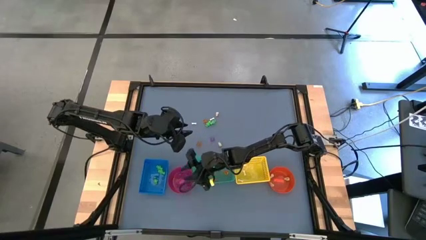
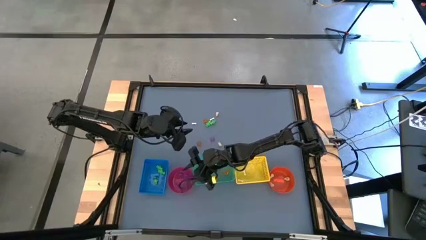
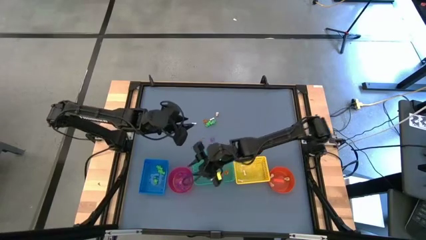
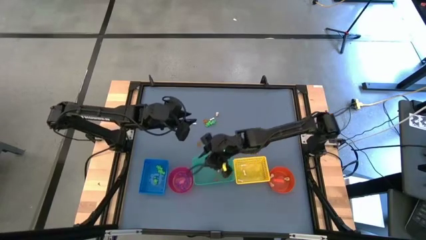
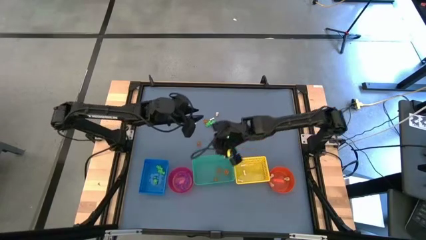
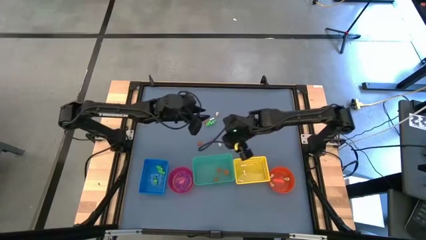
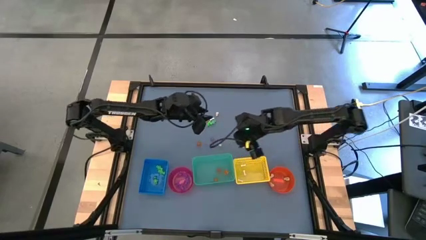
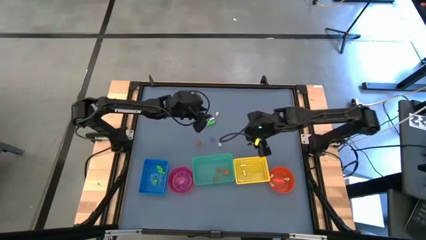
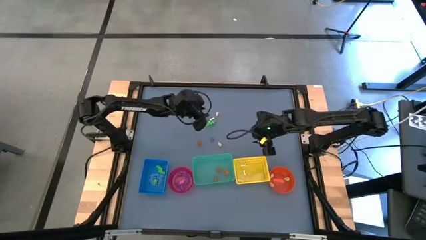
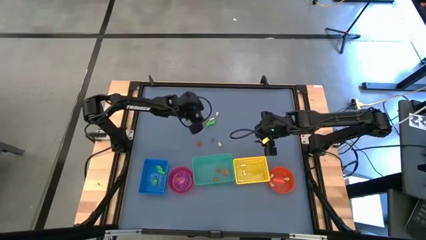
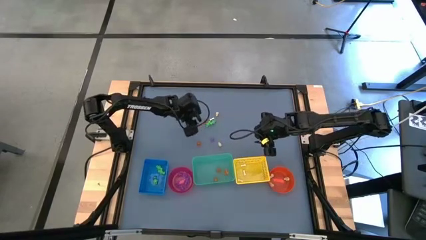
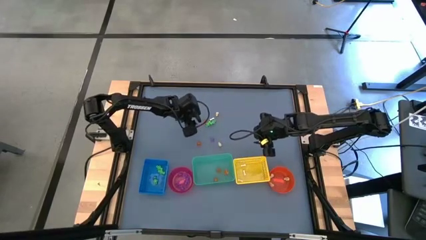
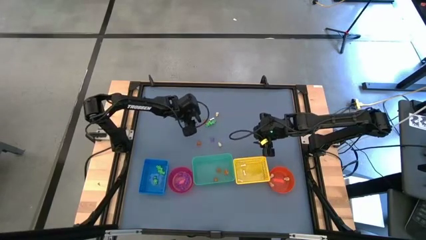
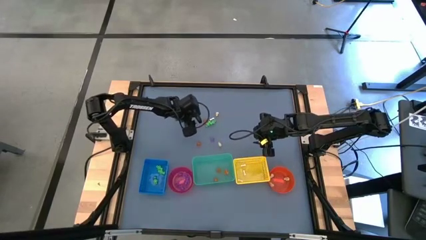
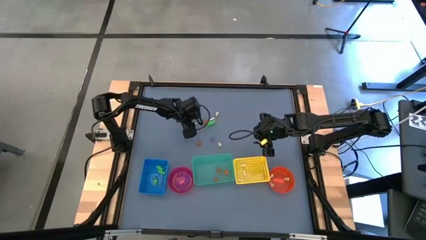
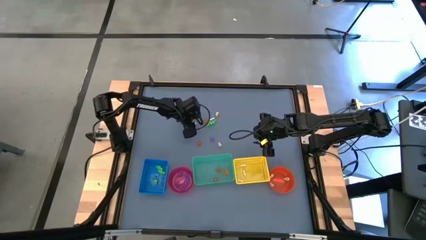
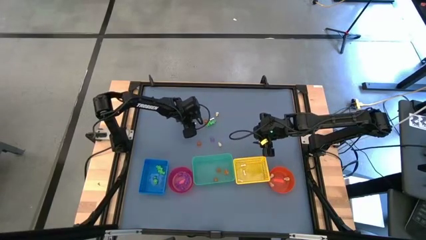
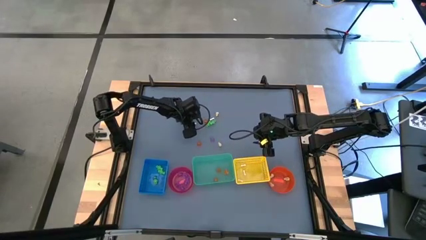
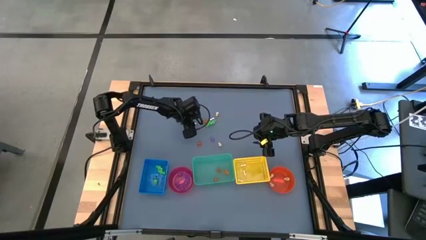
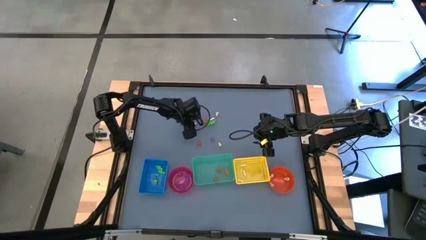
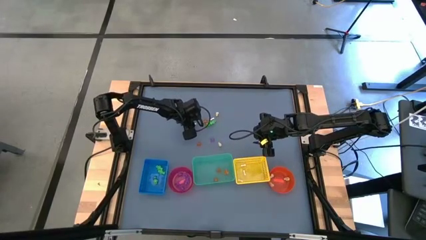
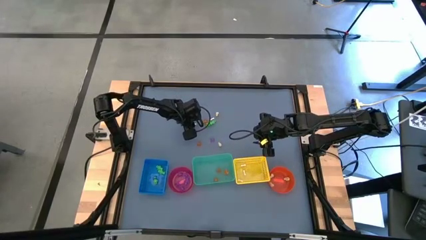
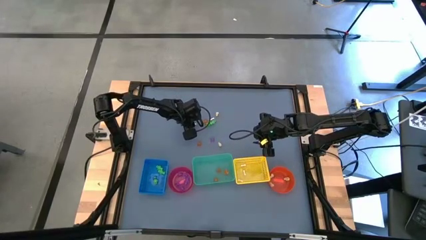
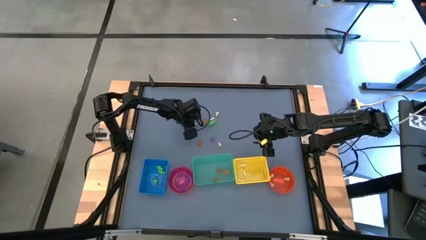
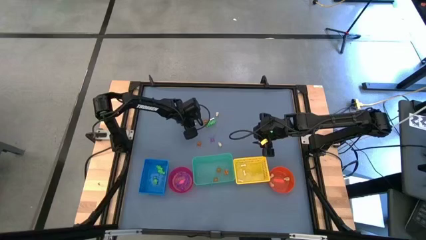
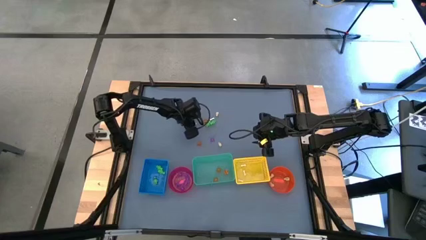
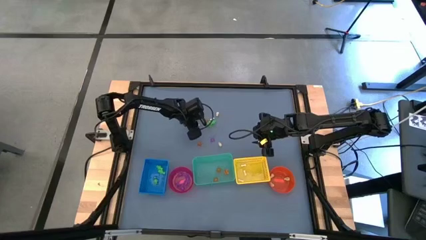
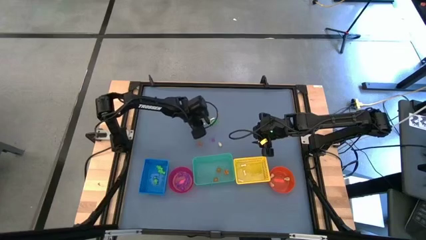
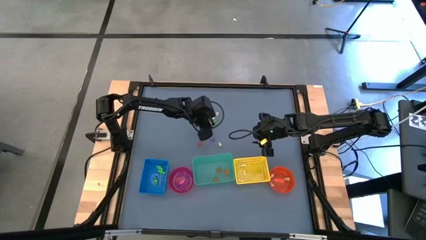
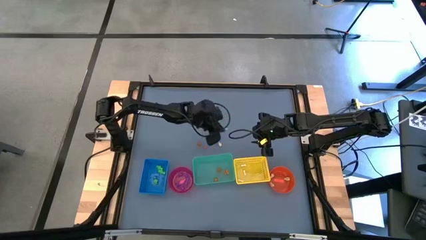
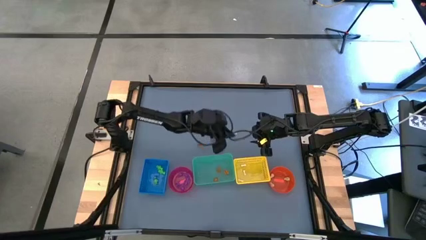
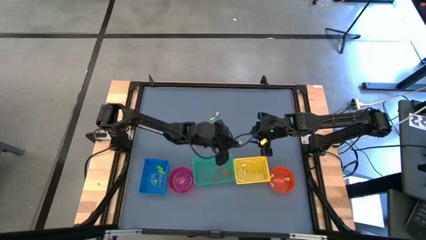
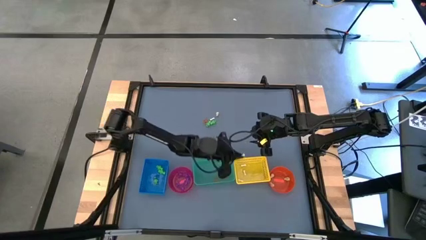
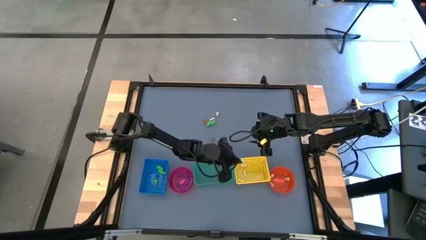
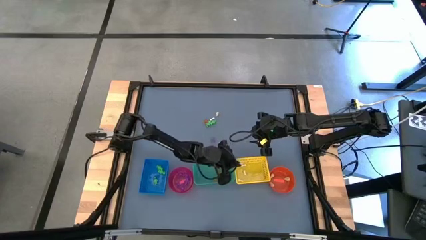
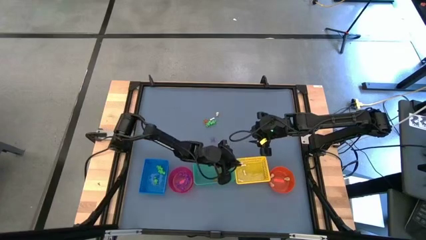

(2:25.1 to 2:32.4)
Task: Sort Halloween decoration
Put the white bone toy into the yellow bin

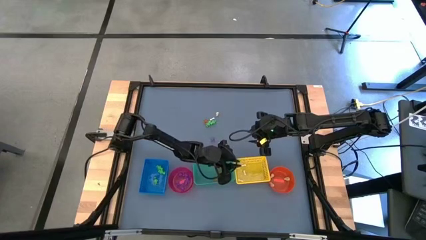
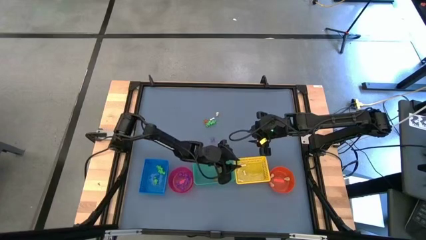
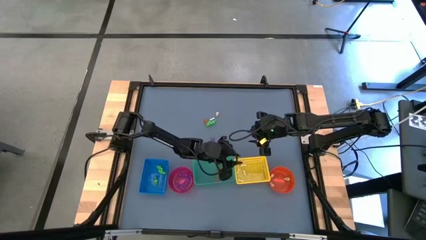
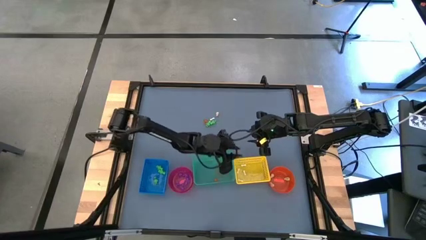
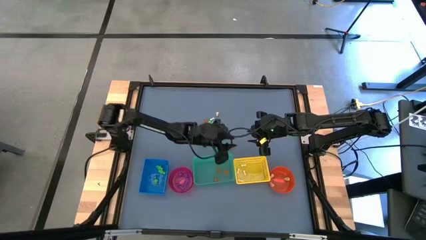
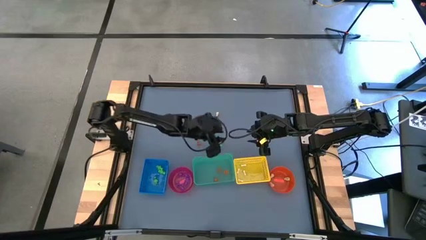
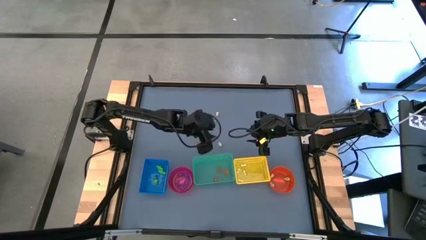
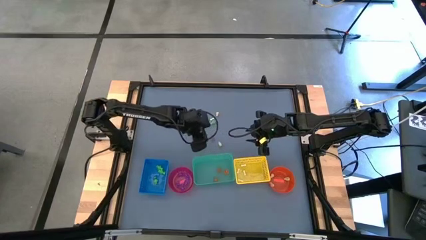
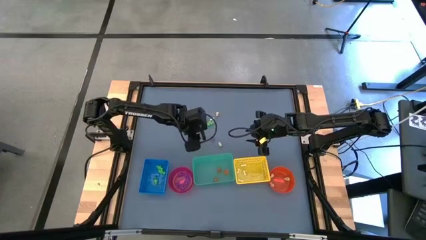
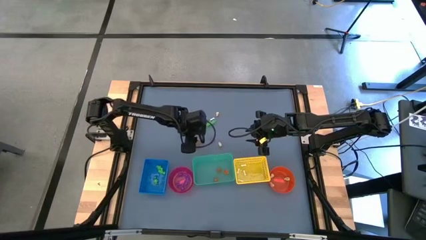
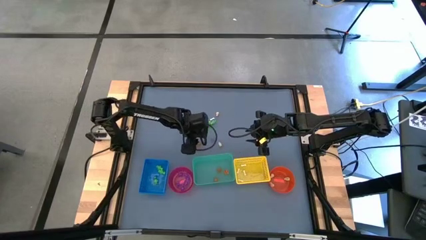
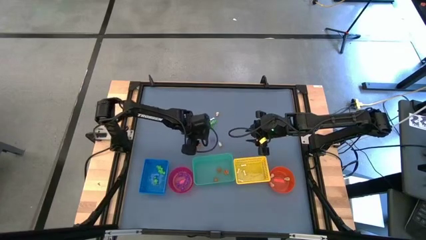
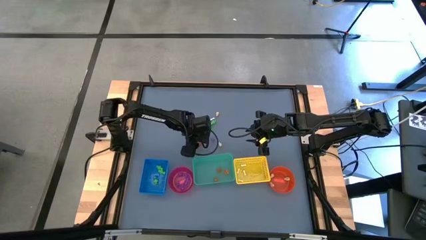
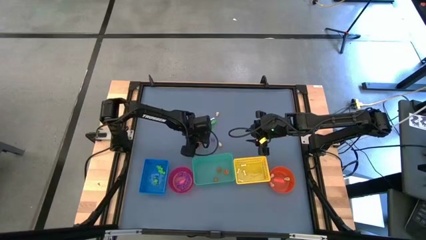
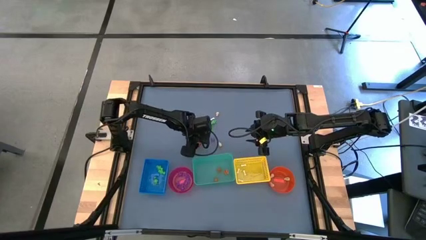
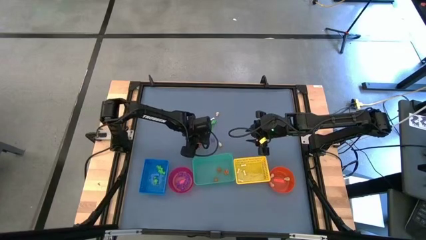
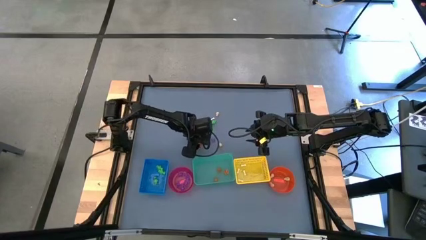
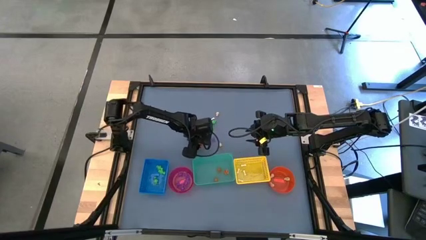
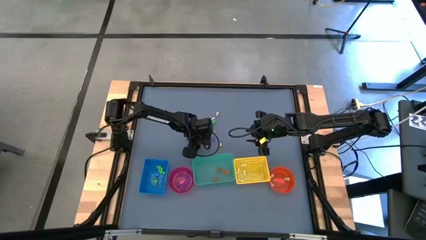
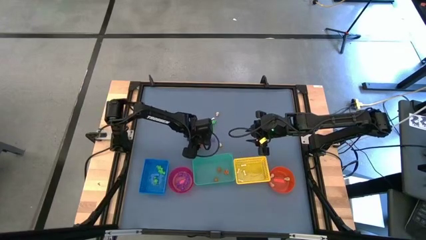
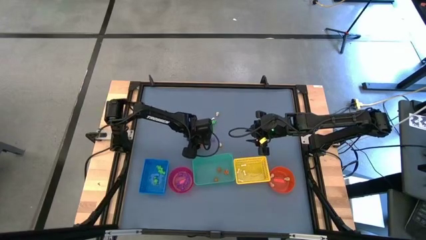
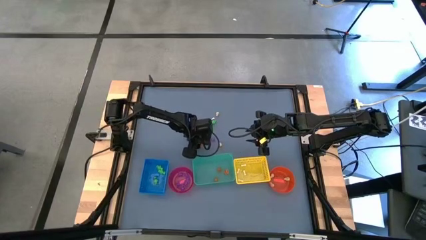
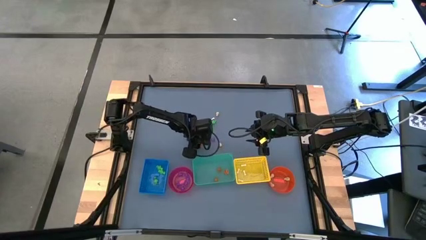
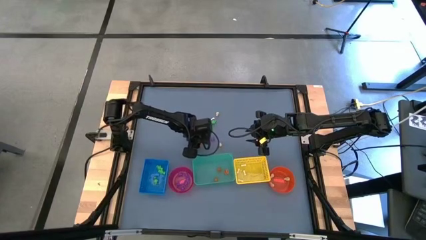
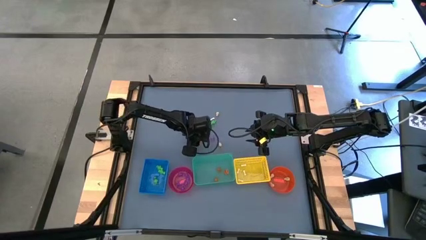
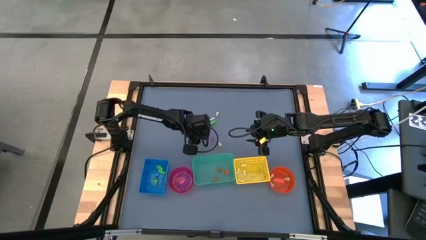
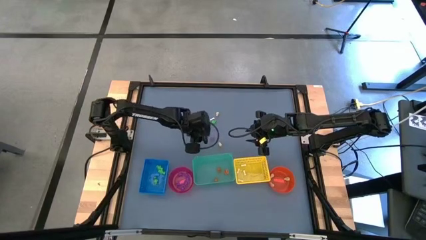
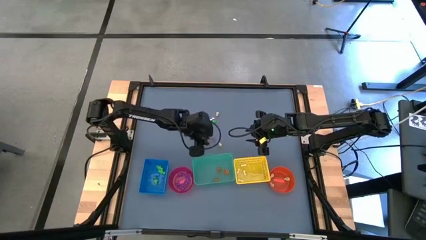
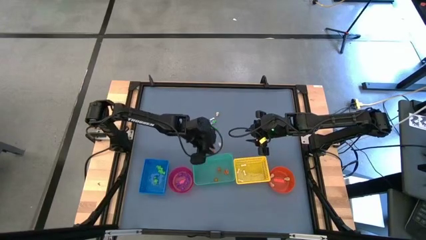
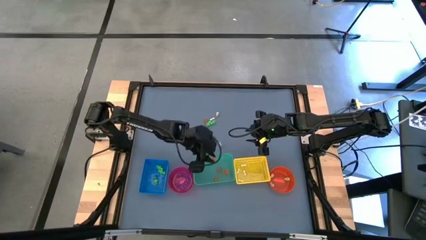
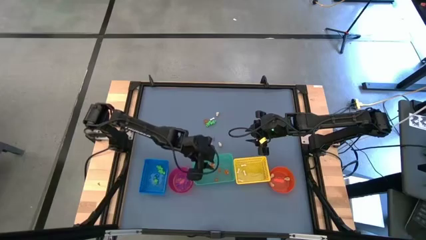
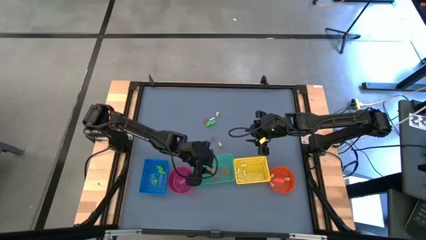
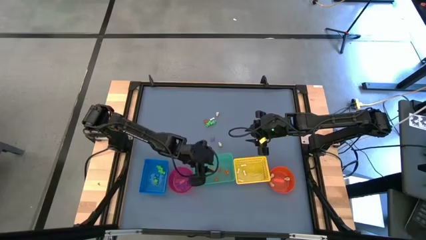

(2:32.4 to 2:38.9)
Put the orange pumpkin toy into the green bin
